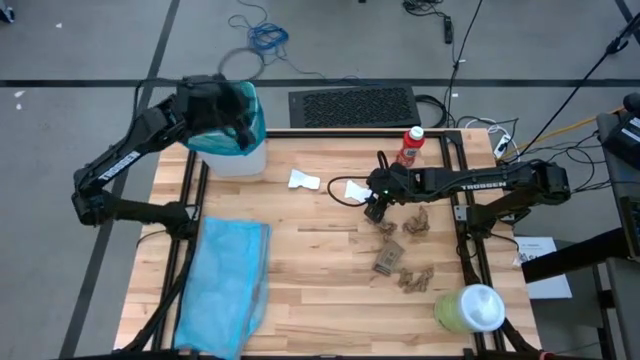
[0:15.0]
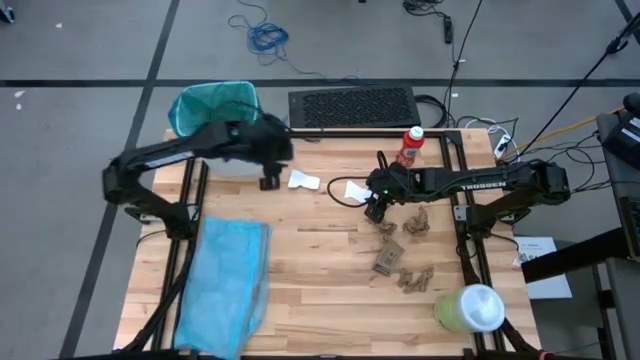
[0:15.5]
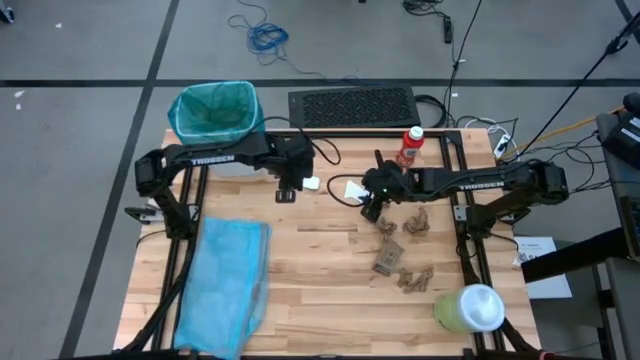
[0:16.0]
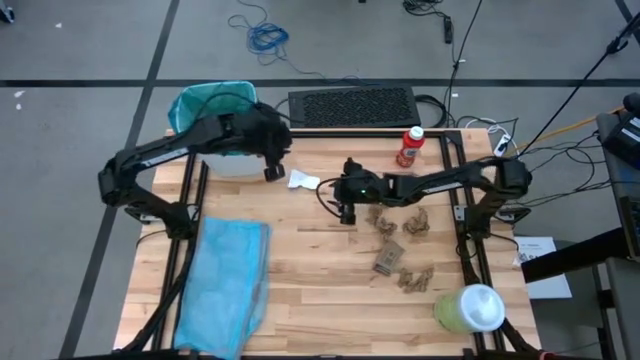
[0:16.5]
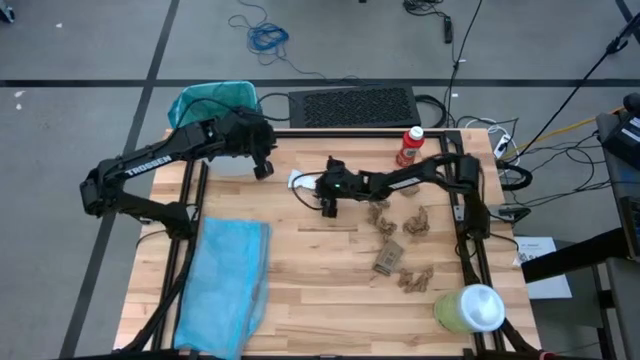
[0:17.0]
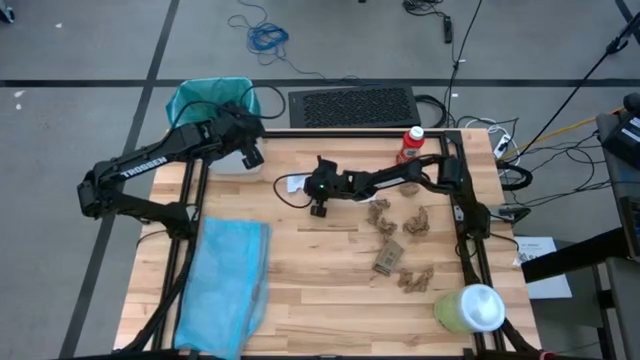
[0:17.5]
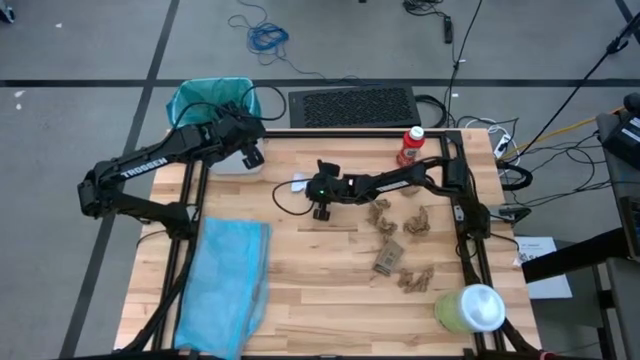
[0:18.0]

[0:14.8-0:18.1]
Task: place trash/remove bag and relplace
Put the white paper into the trash bin

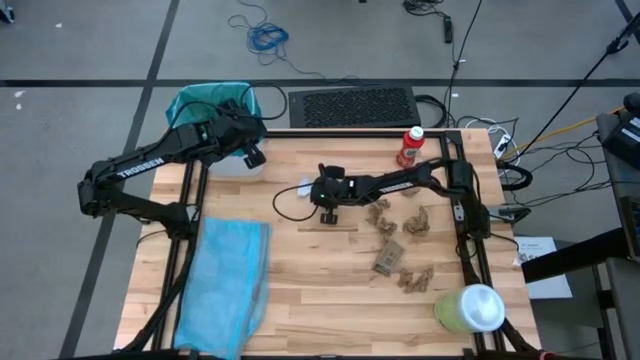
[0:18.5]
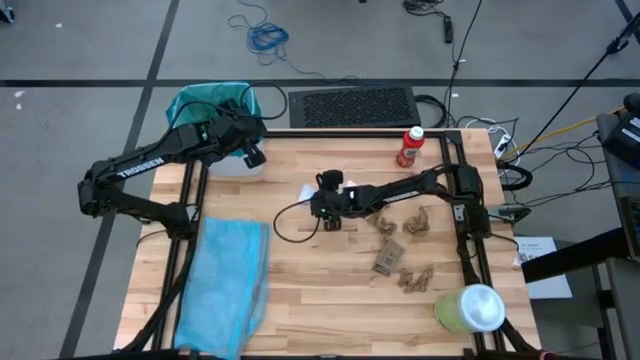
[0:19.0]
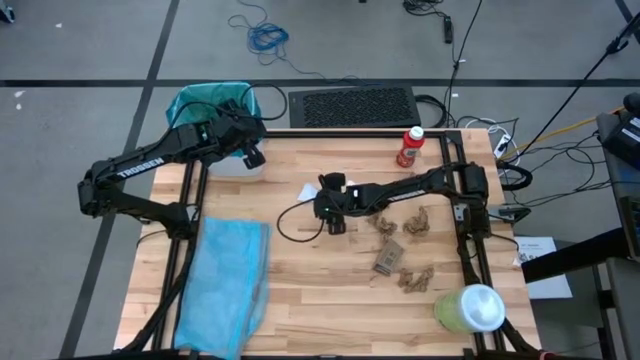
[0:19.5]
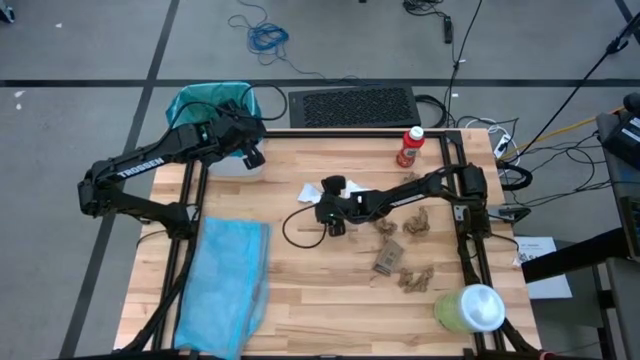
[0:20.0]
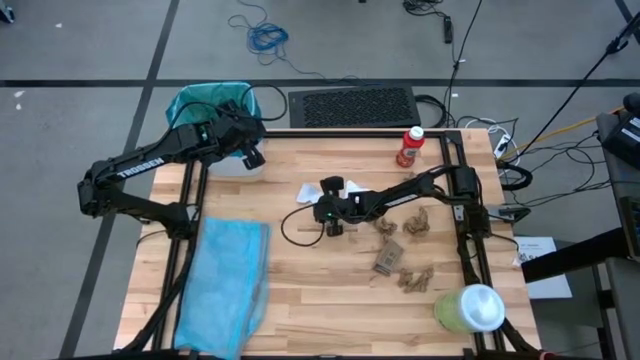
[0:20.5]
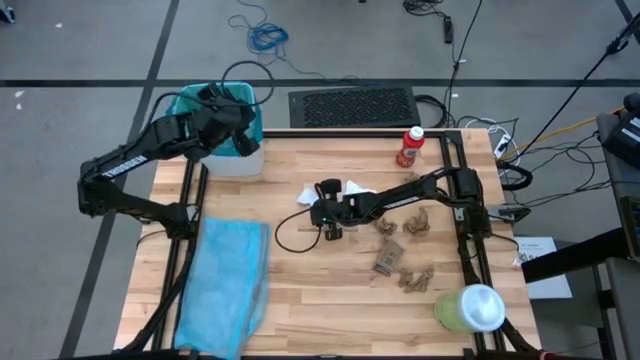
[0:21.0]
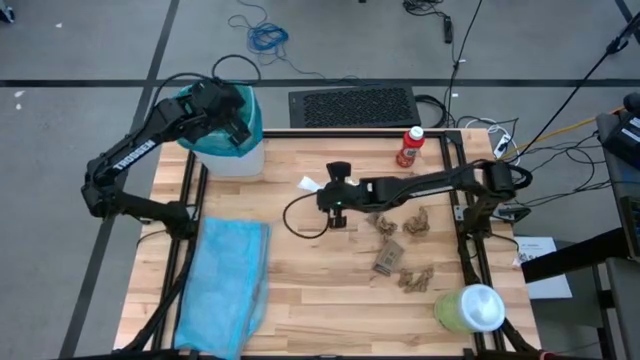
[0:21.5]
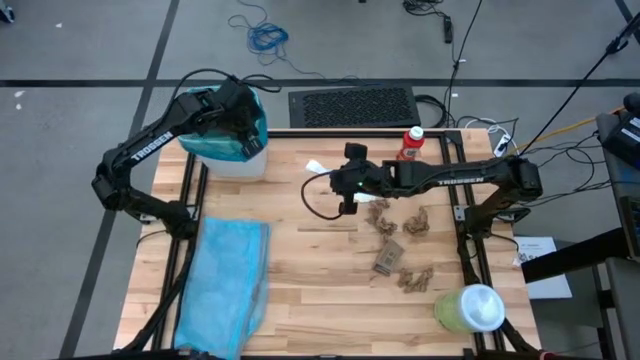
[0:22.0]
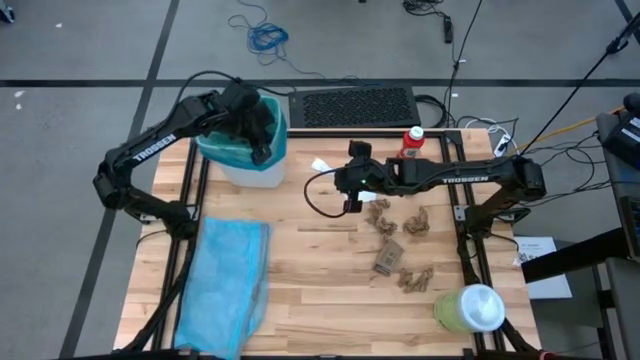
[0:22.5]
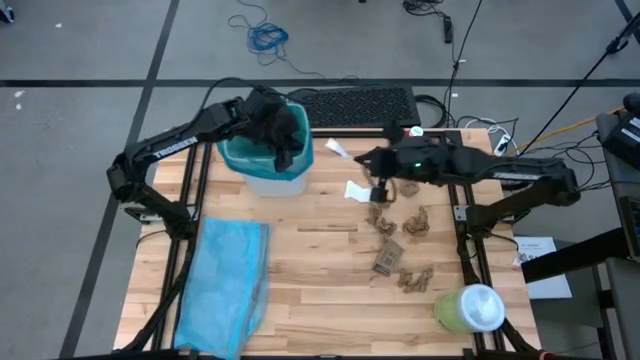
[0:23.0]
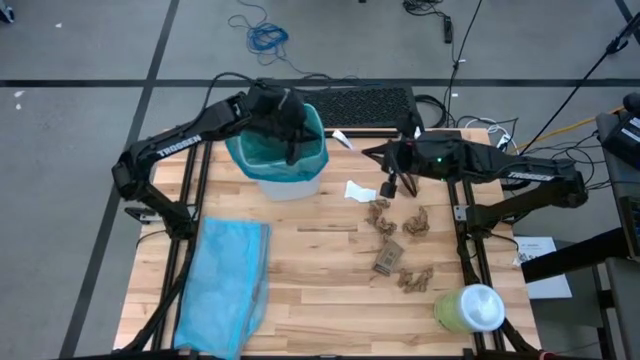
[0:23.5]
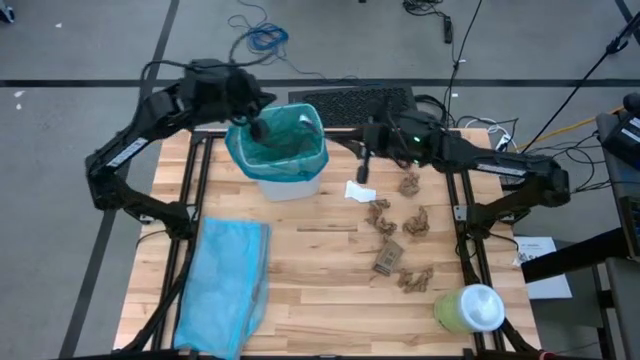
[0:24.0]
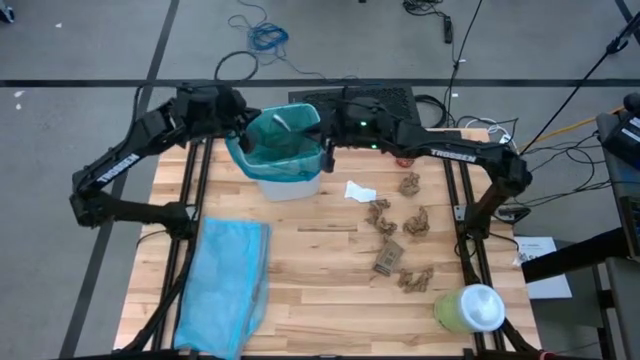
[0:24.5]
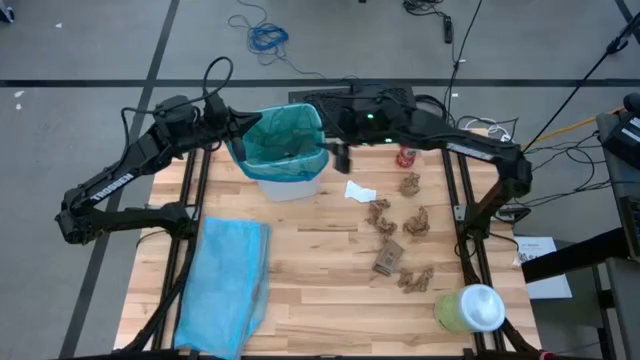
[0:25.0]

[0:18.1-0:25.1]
Put the white paper into the trash bin

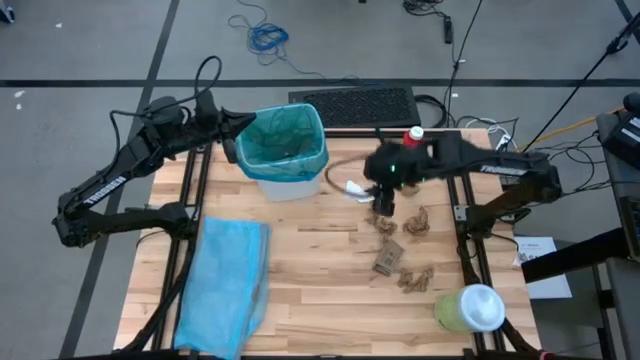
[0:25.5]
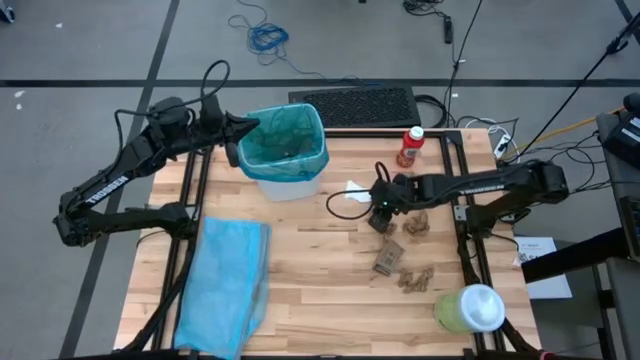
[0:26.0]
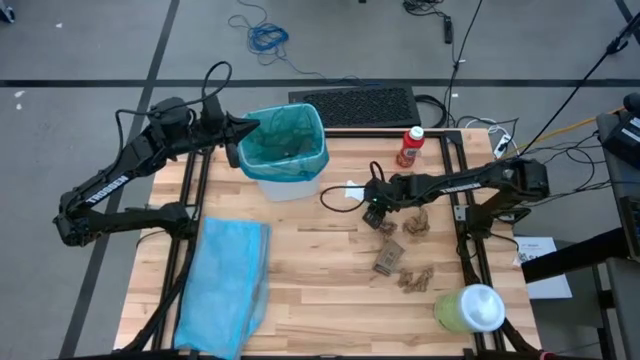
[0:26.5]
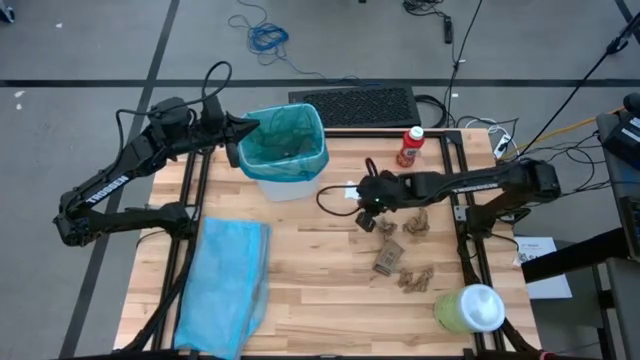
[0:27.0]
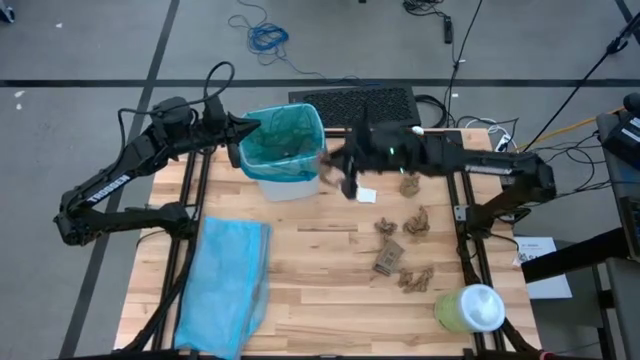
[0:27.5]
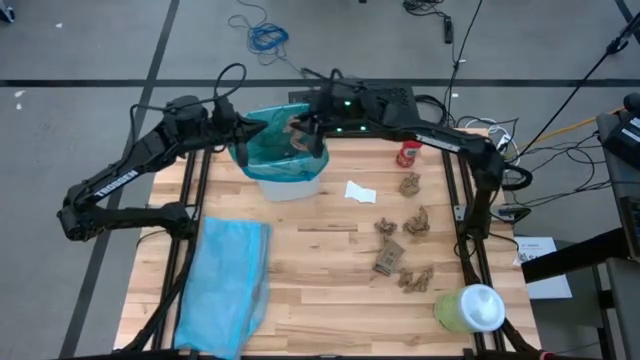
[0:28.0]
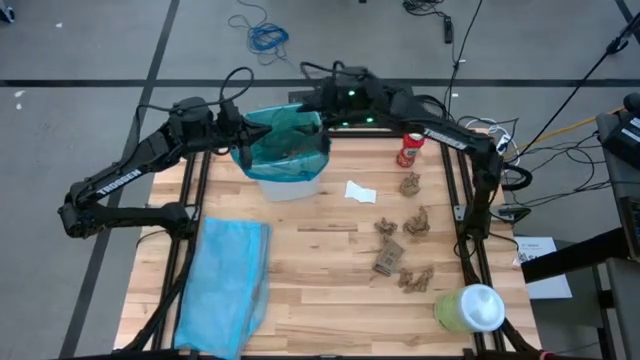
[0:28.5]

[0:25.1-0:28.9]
Put the brown napkin from middle

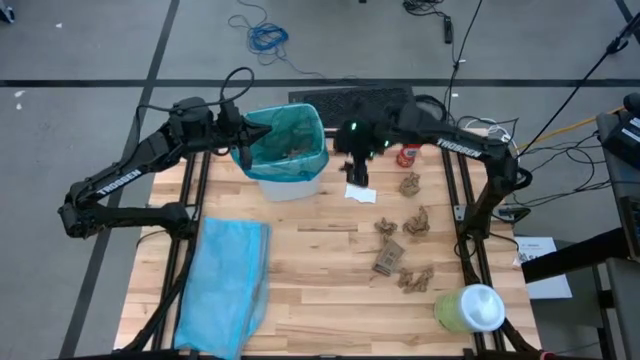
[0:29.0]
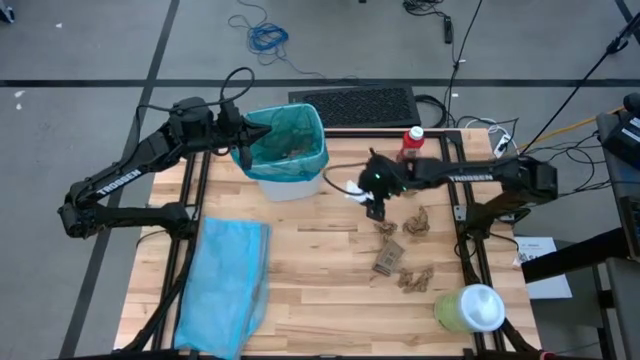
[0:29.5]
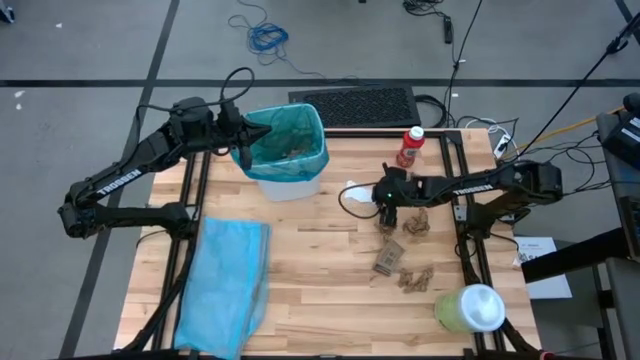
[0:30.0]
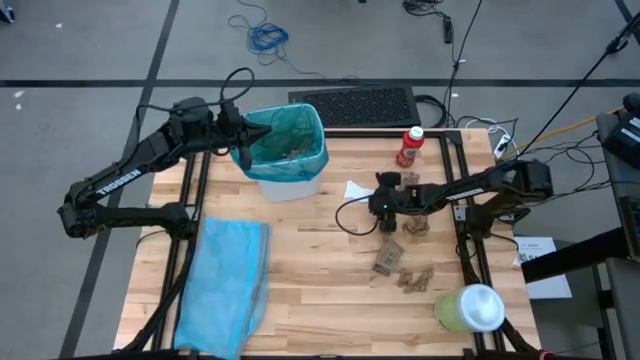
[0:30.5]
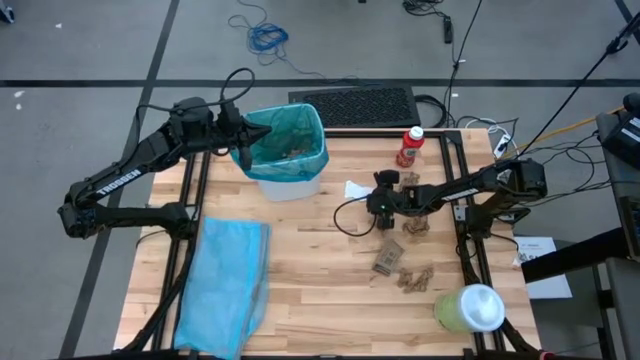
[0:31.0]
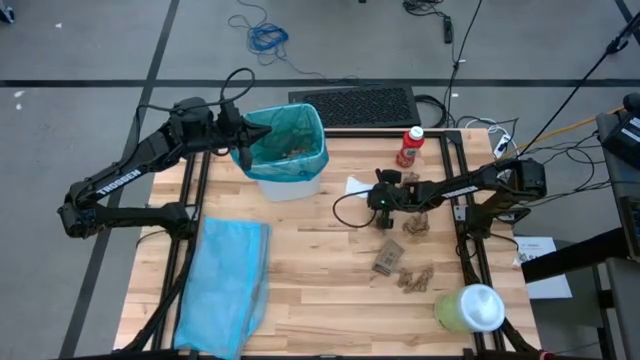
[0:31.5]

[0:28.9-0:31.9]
Put the white paper into the trash bin

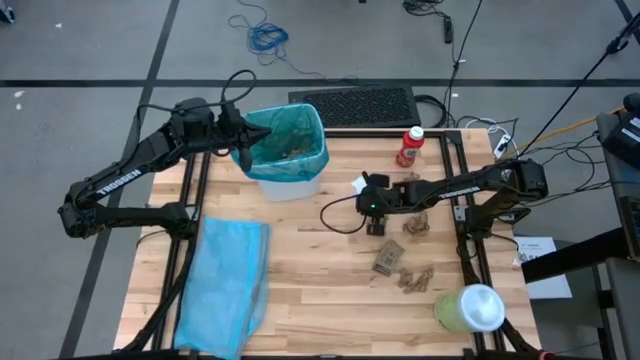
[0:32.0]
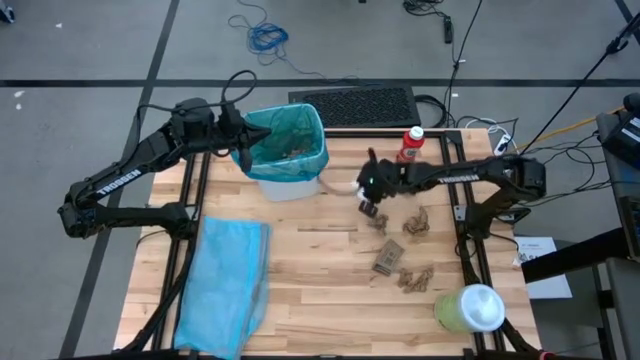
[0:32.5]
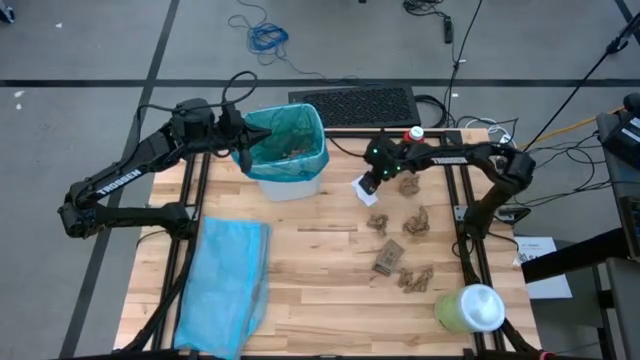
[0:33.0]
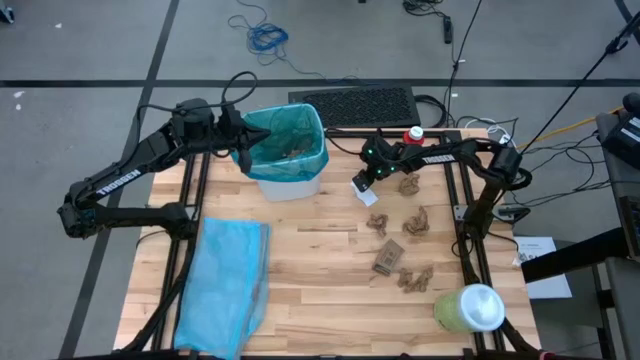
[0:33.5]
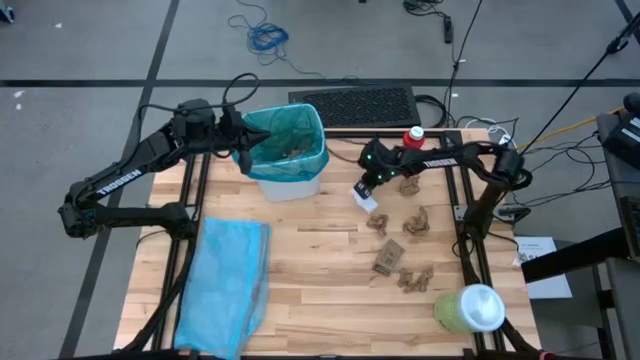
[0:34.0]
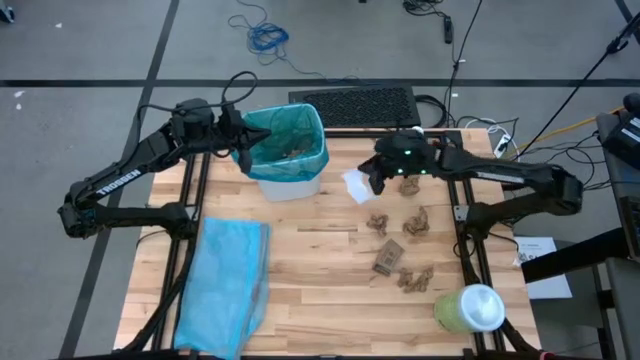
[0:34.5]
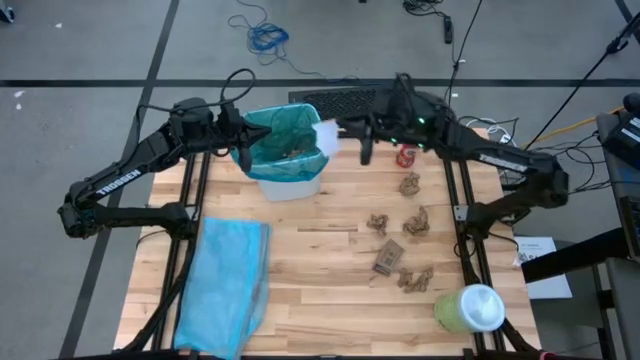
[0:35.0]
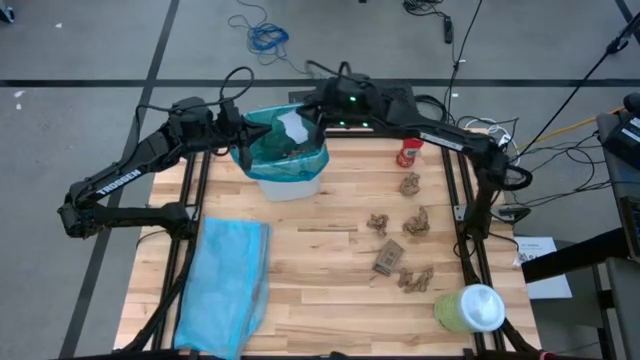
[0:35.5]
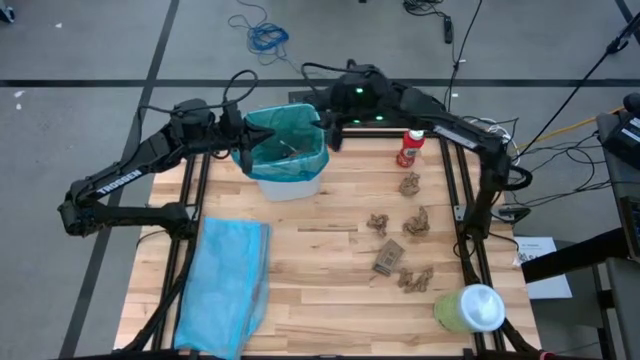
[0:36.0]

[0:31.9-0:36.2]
Put the white paper into the trash bin
